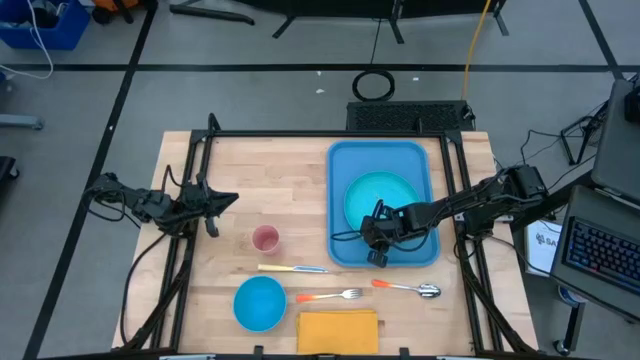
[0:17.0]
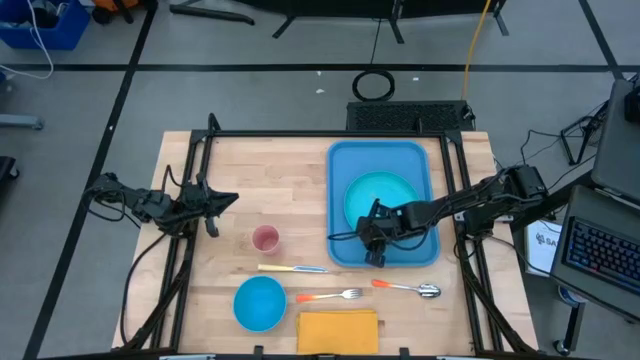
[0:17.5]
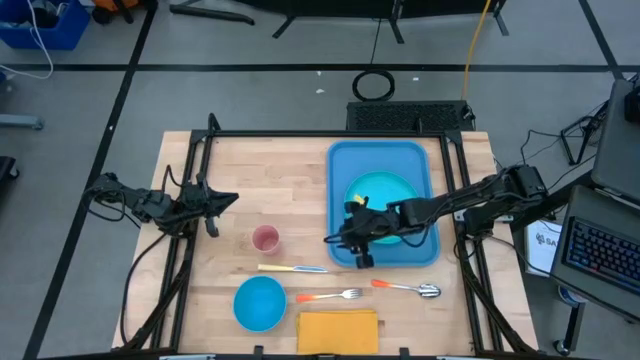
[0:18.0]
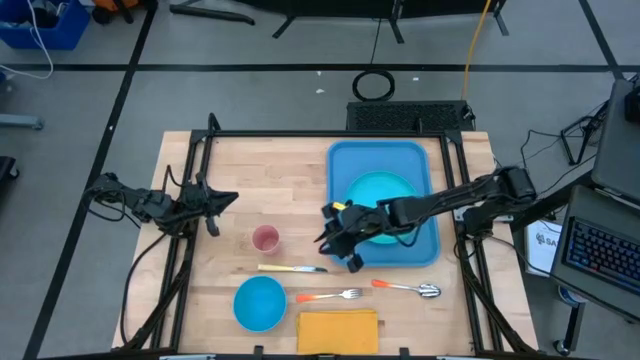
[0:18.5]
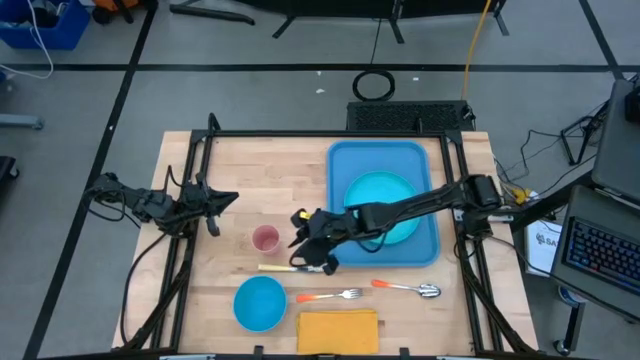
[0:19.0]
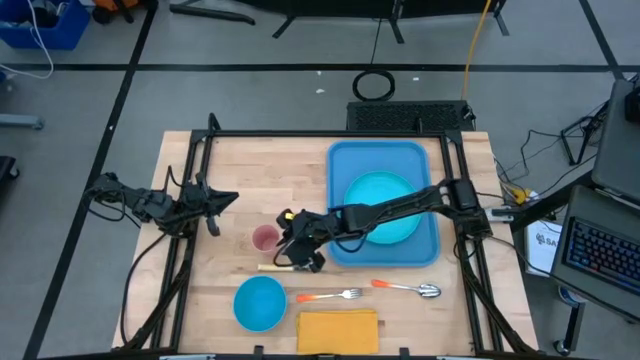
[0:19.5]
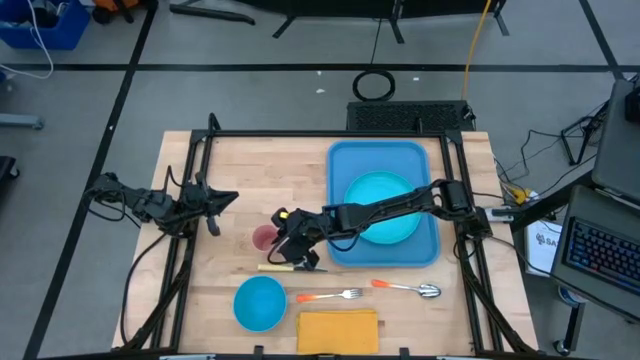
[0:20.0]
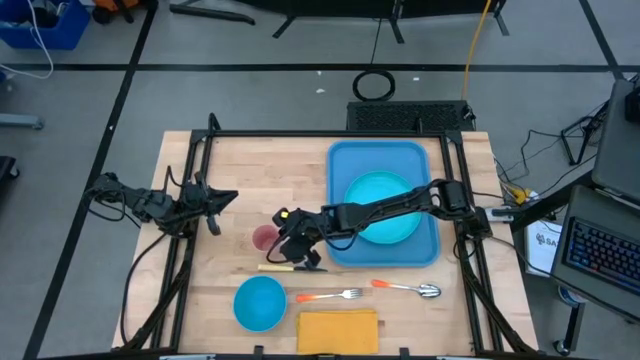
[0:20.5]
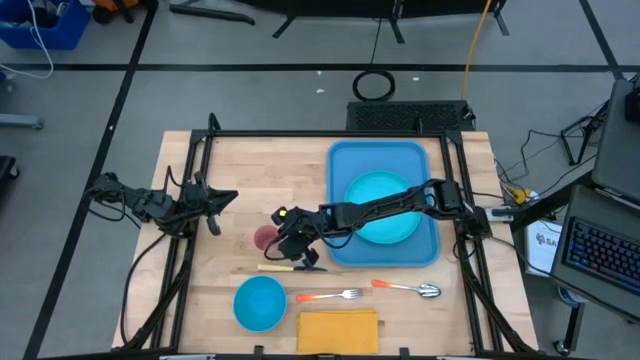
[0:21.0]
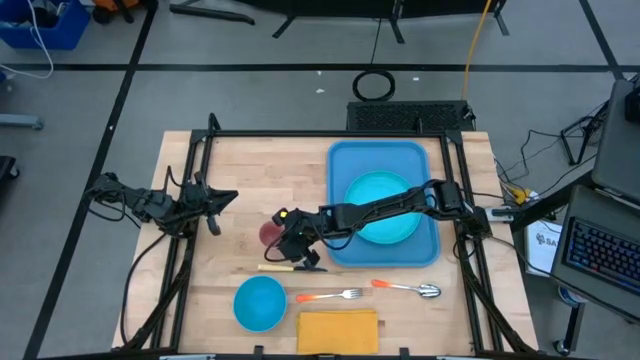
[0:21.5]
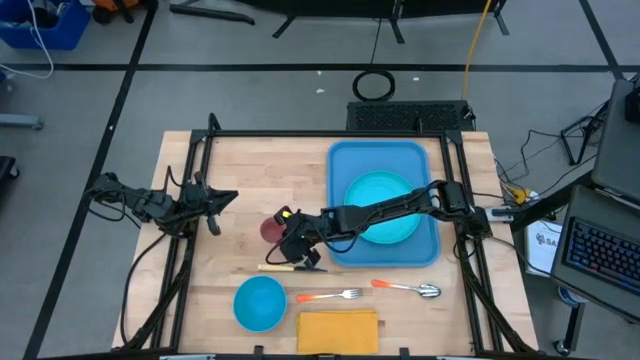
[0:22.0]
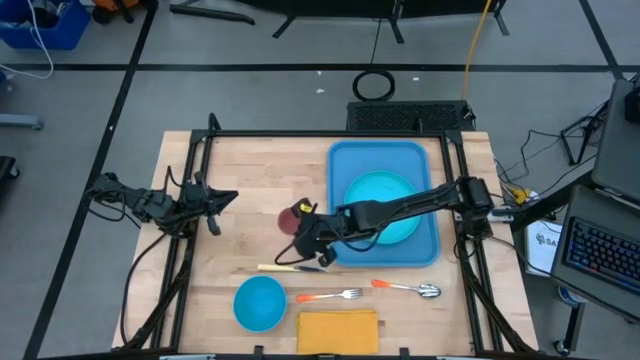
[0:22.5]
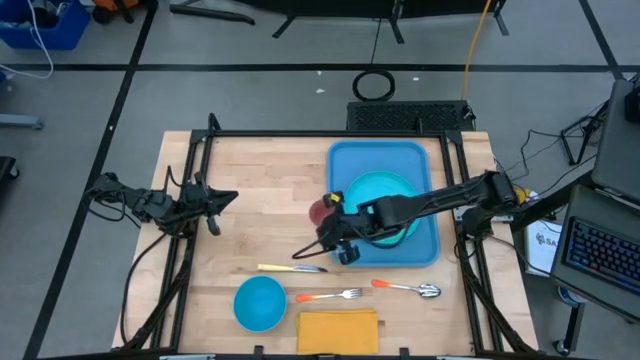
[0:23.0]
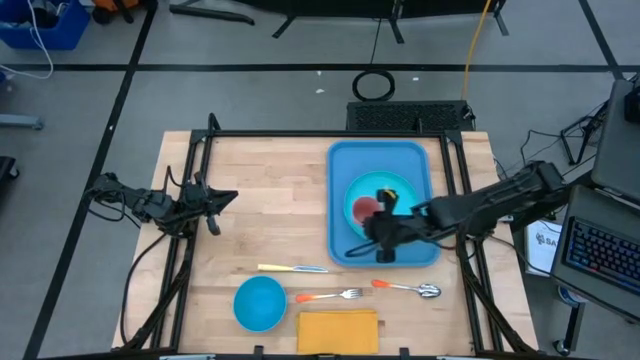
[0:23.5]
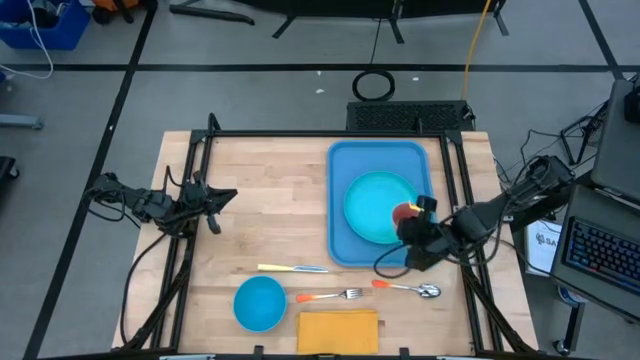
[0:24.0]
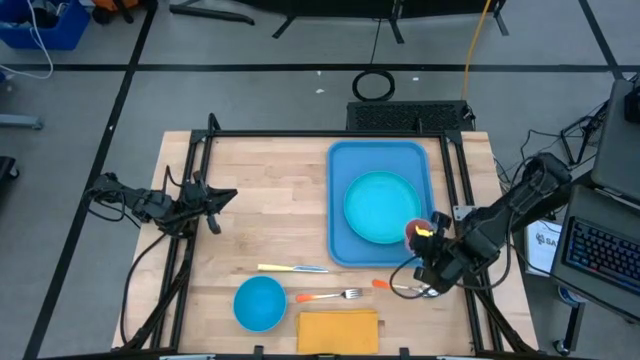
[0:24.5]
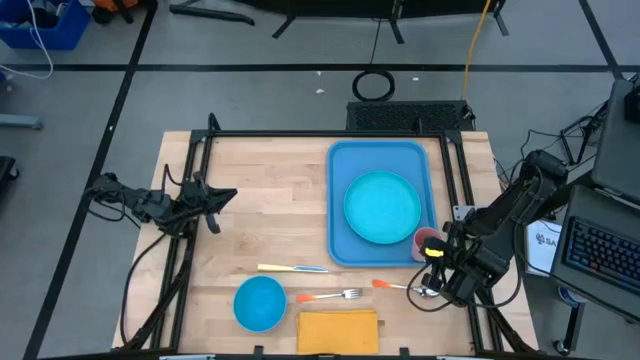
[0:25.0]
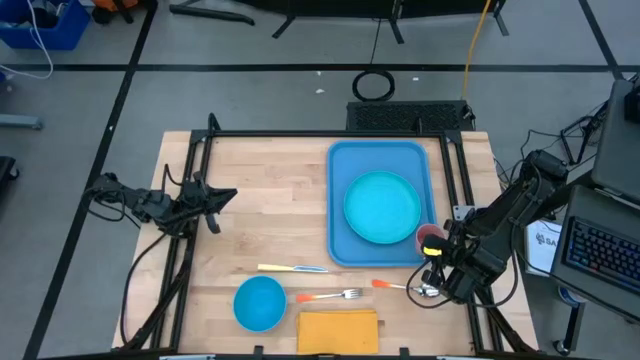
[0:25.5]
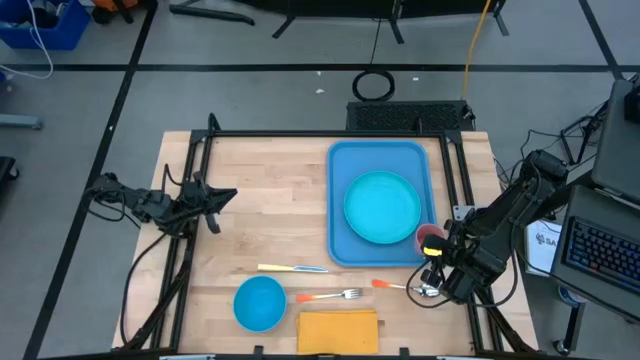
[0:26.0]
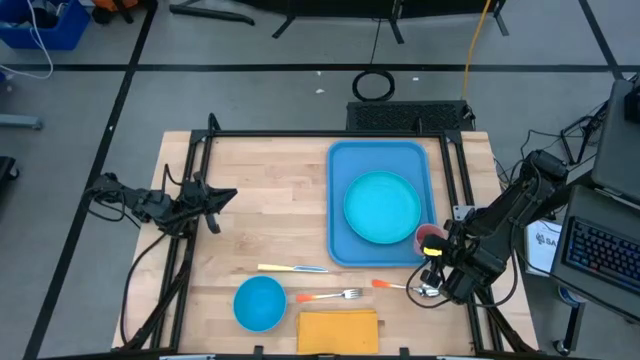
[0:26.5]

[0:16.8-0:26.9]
Task: Set up tray
Put the pink cup to the top of the green plate on the blue serving tray

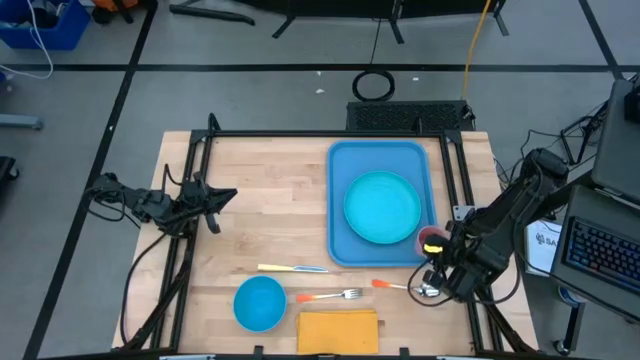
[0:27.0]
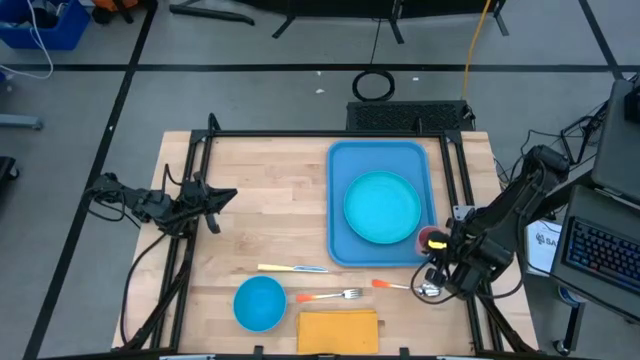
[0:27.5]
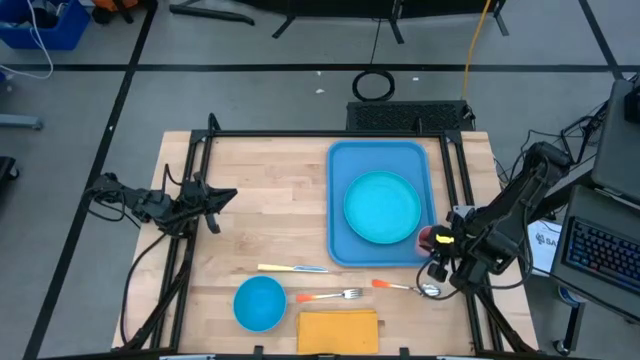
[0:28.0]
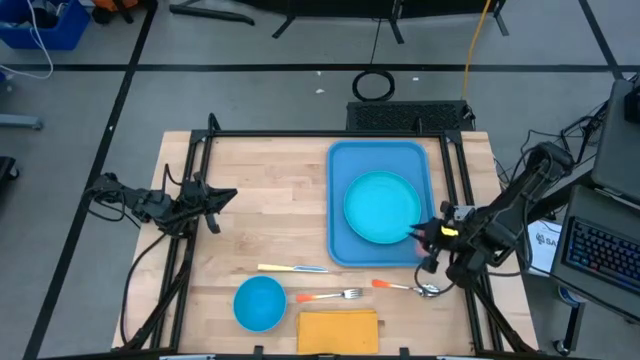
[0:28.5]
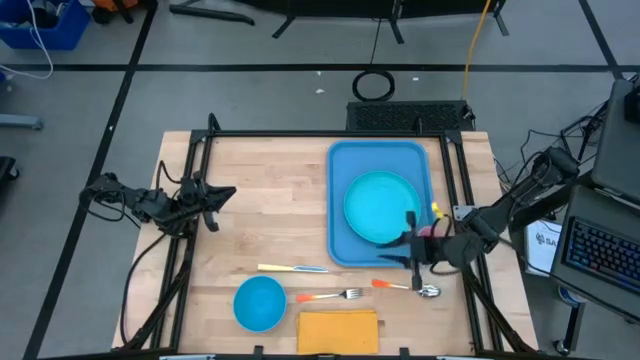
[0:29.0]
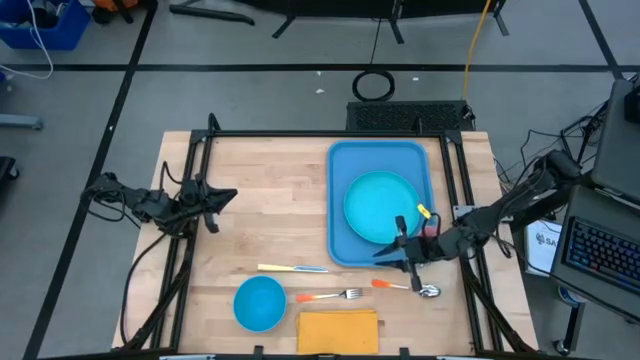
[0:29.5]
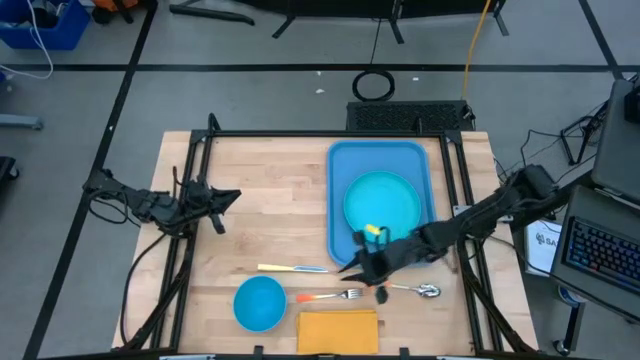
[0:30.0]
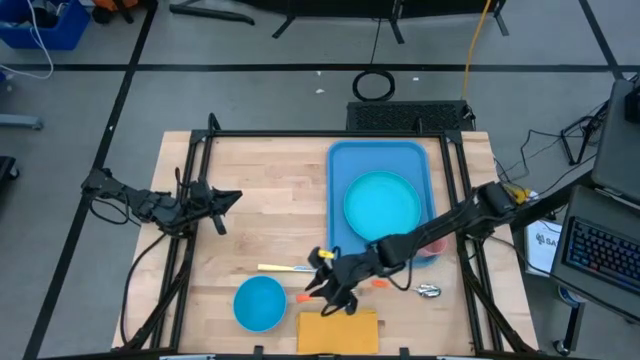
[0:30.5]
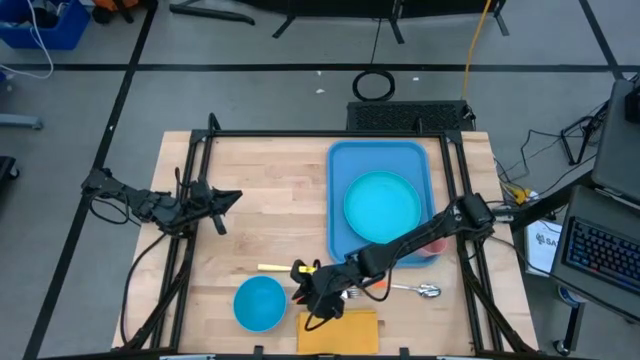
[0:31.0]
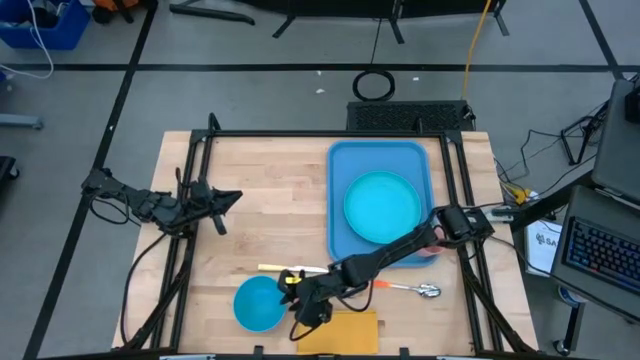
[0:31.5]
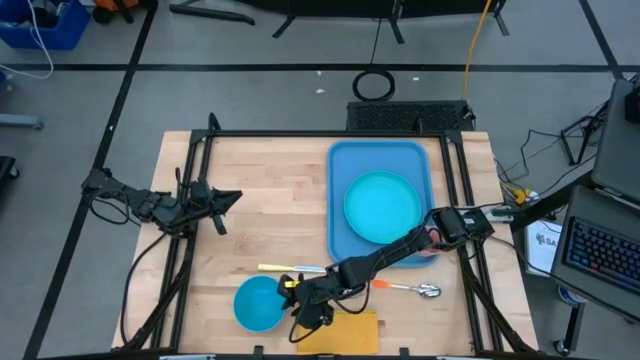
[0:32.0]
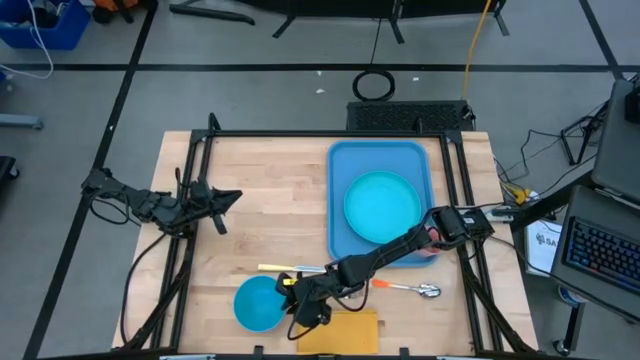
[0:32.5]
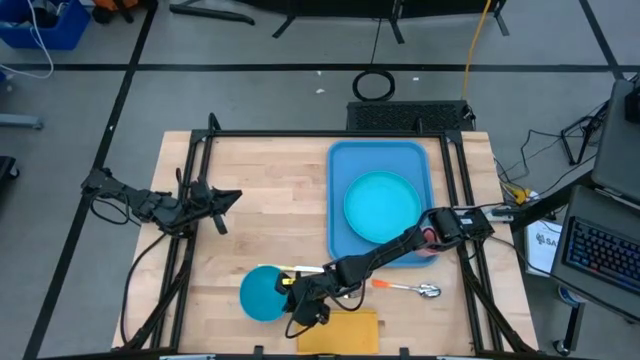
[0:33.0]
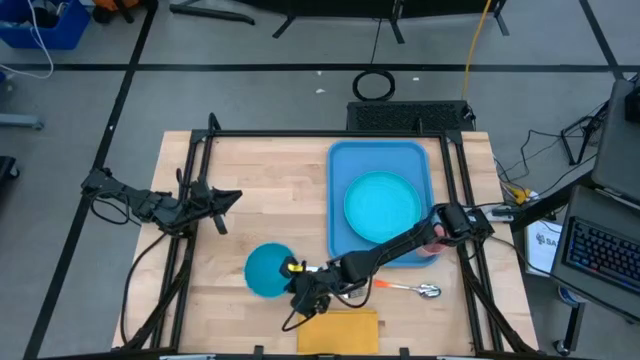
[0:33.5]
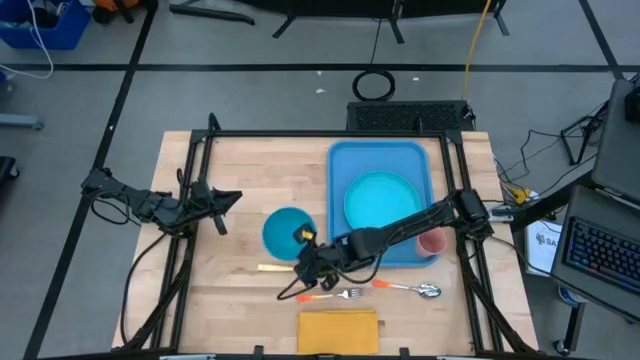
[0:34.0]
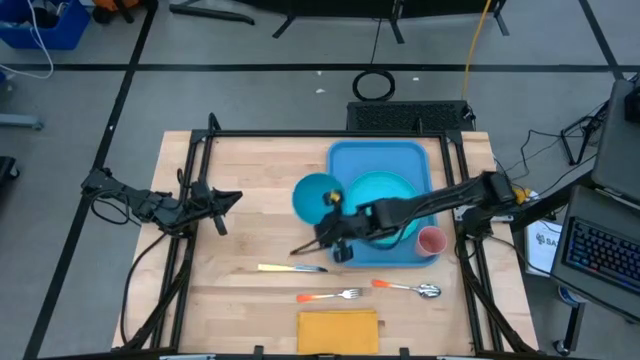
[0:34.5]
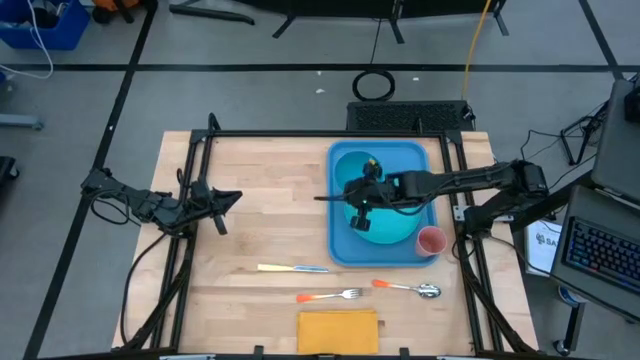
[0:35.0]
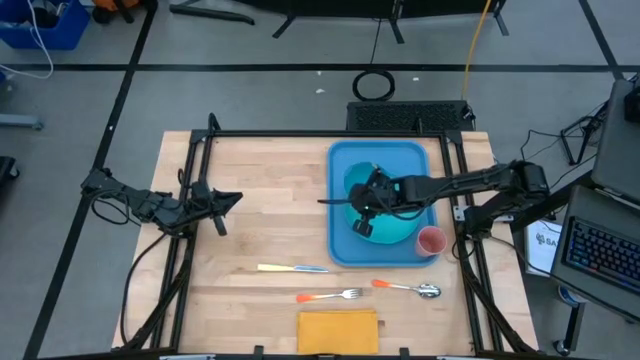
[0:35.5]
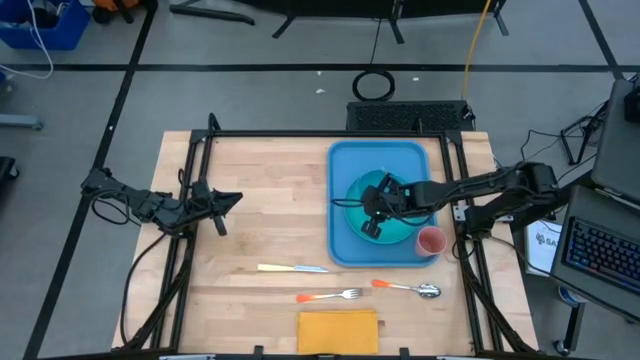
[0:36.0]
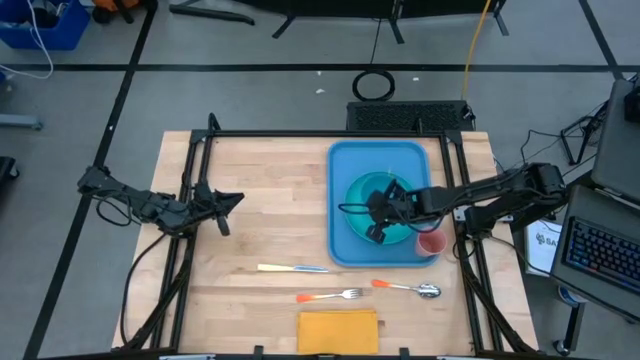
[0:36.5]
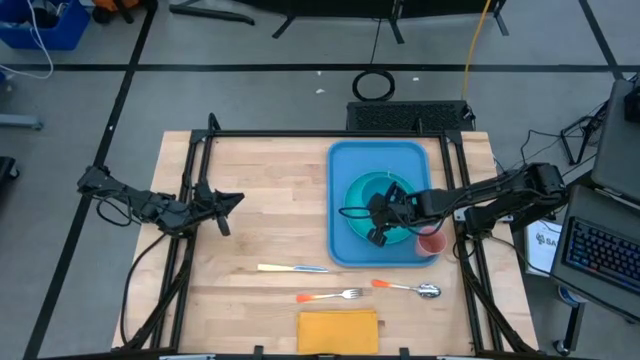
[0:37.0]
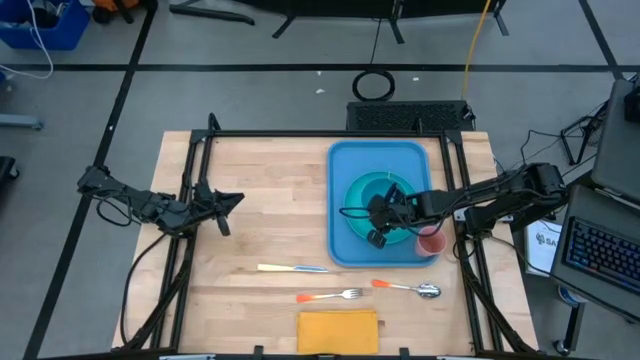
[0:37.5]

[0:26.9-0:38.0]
Put the blue bowl on the green plate on the blue serving tray
